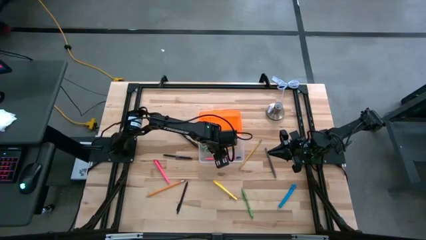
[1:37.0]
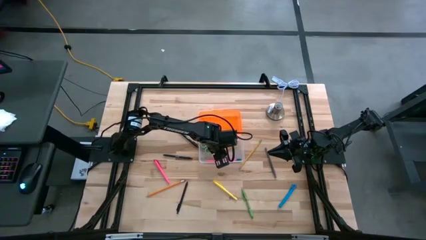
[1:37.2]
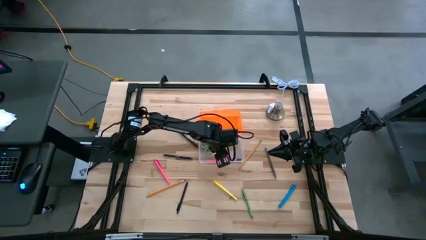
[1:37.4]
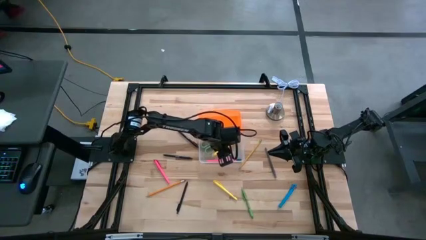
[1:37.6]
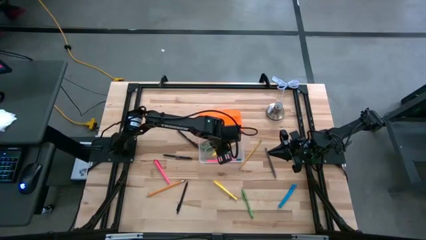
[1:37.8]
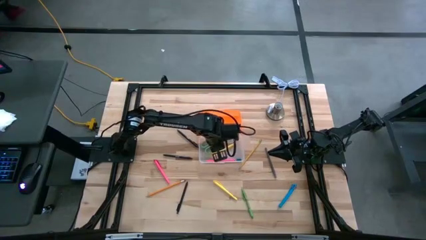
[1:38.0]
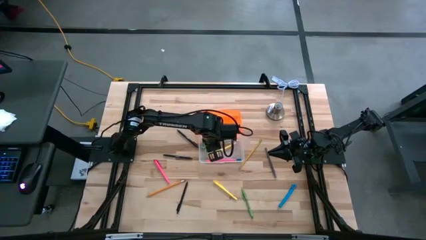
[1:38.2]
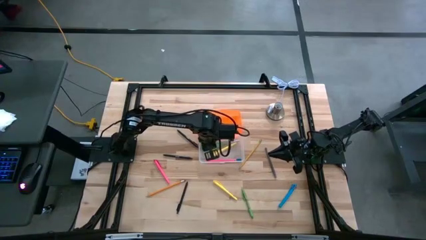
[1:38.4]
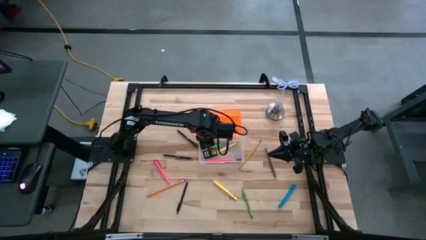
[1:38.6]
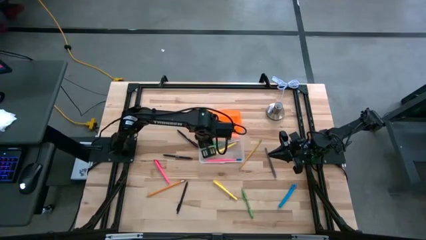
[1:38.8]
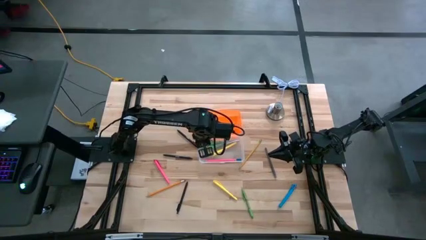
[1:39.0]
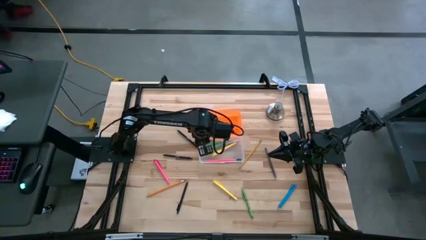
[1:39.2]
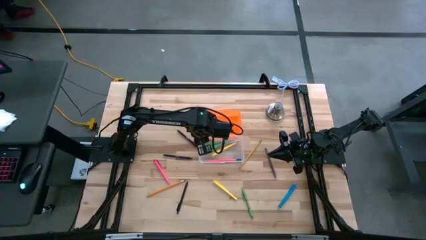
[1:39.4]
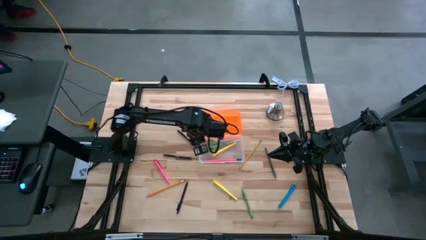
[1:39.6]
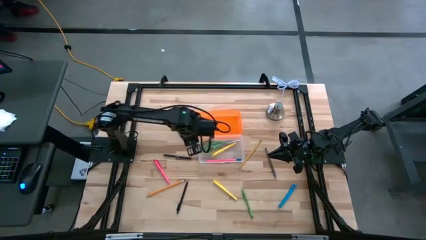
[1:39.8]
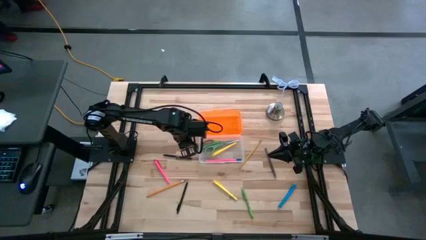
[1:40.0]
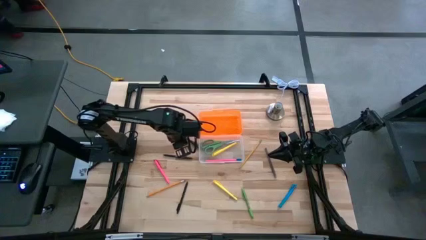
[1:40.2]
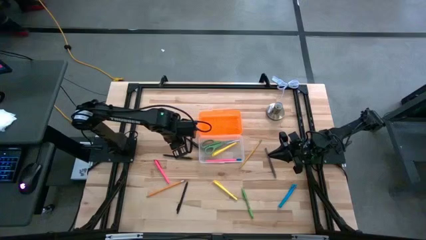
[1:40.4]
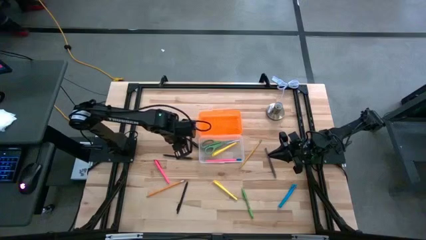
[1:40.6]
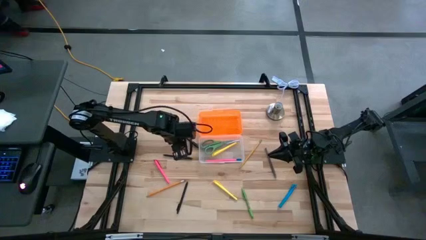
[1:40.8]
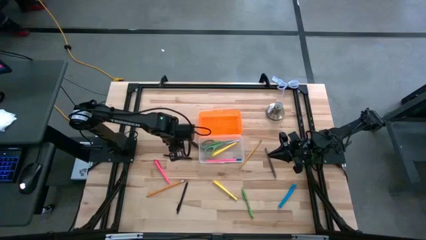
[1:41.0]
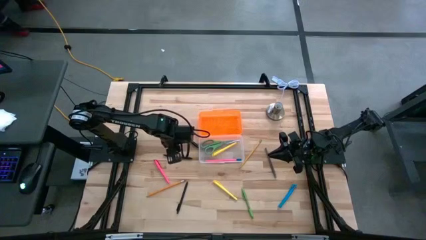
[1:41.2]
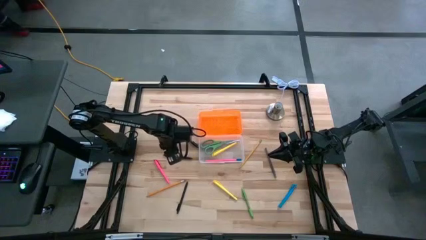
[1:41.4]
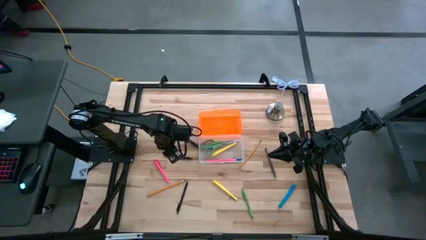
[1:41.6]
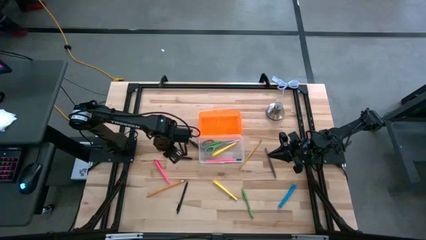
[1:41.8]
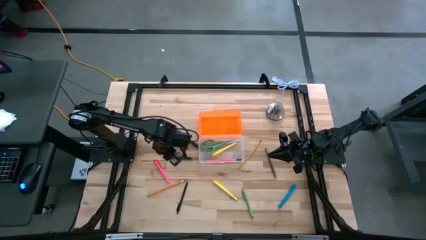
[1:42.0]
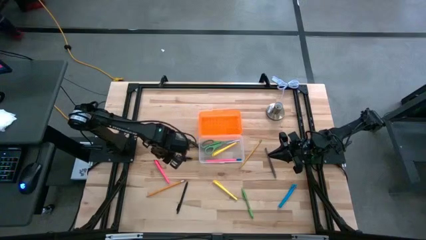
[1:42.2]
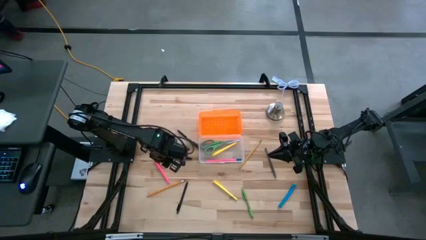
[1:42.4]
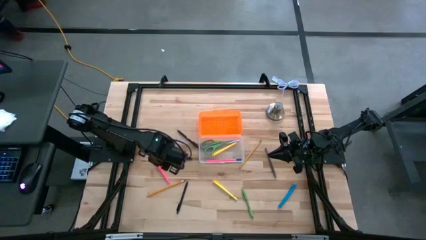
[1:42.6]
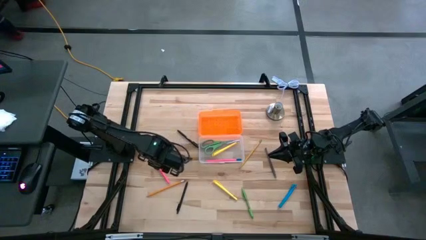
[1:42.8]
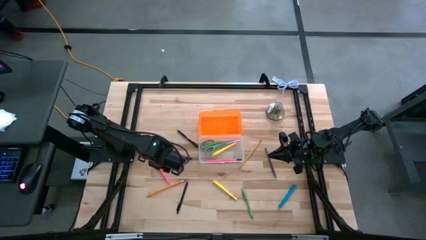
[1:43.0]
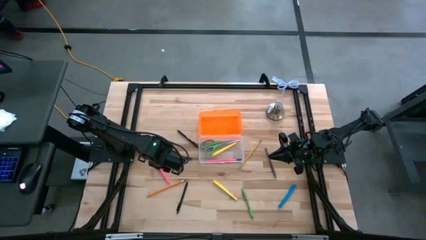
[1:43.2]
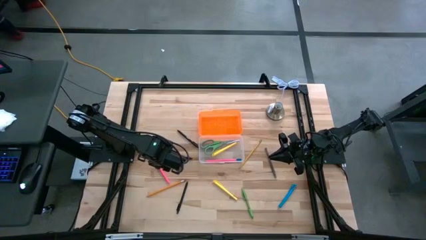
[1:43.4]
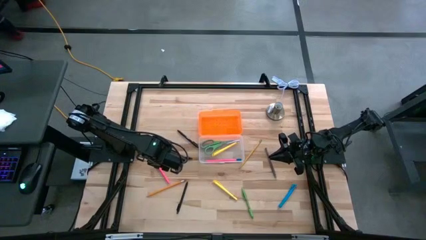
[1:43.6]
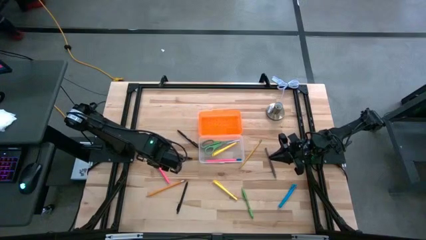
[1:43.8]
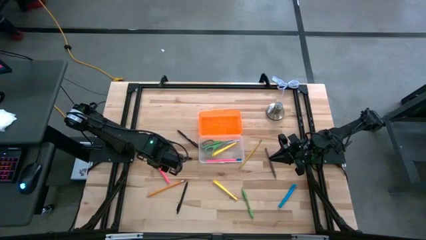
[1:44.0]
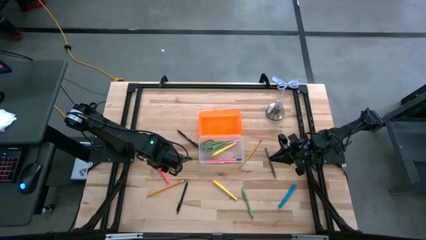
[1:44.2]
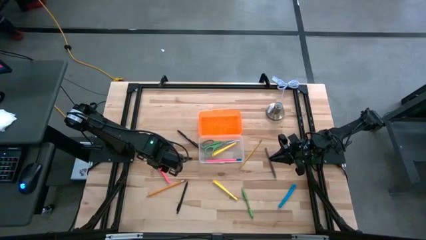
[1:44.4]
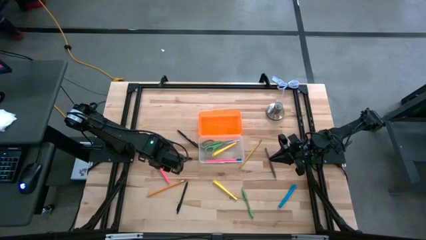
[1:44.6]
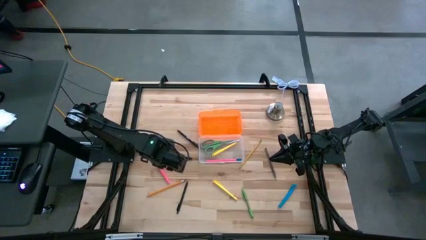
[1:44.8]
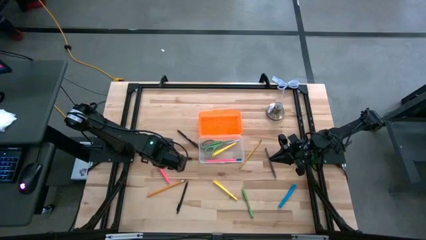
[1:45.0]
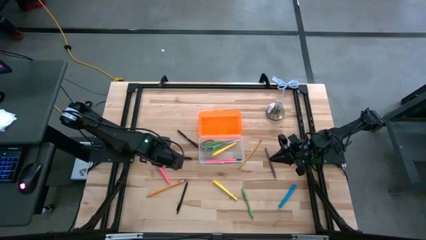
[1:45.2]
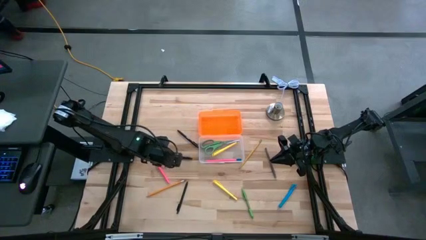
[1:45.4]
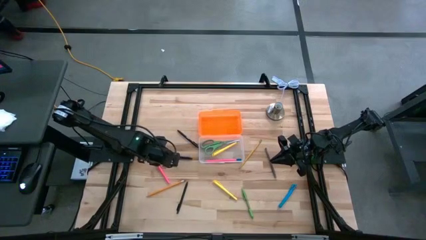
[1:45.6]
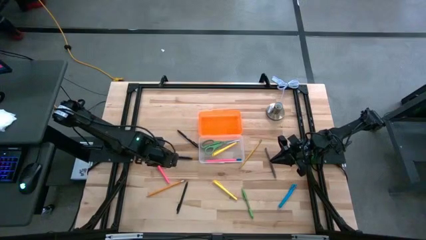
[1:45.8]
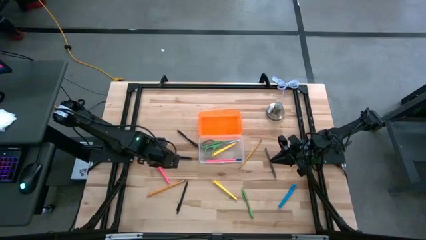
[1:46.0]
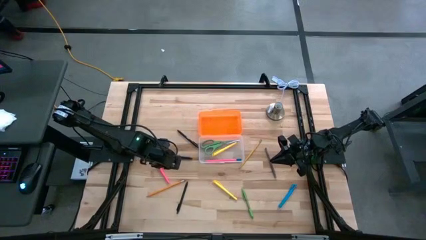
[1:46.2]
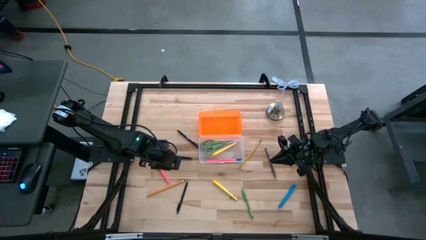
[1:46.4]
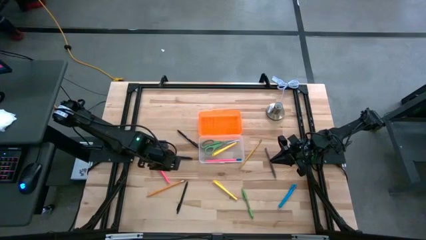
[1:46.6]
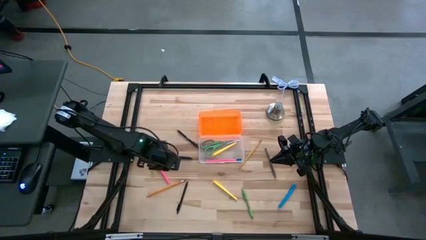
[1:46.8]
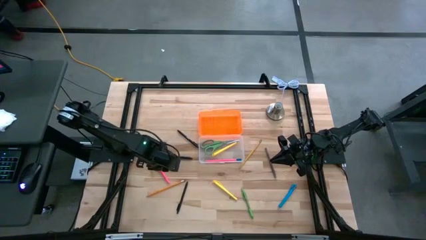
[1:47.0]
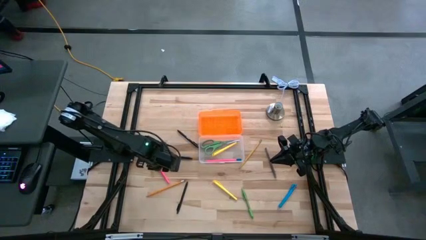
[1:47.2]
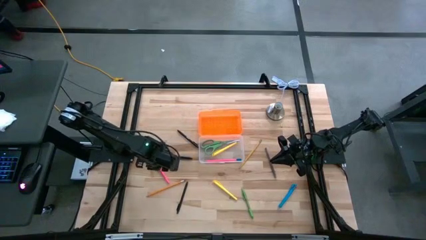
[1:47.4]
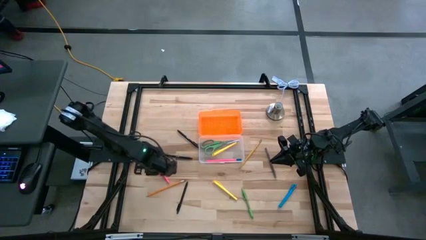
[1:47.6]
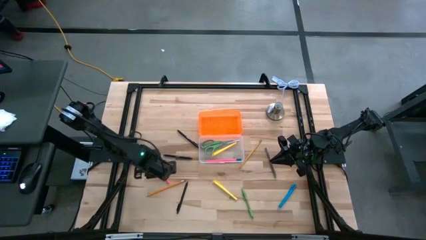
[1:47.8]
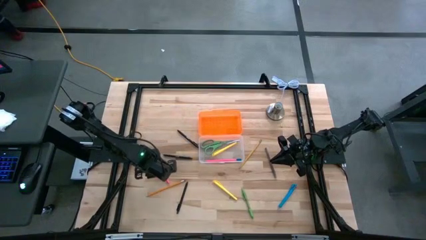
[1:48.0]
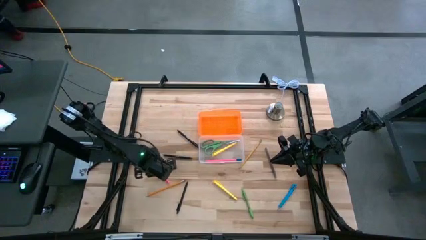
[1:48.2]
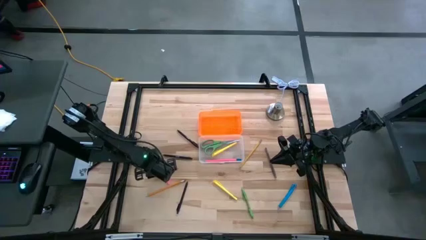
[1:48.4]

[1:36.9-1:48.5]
Task: Pick & place school supplies into a supply box
Put the pink pen into the container

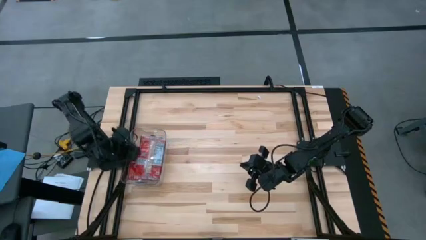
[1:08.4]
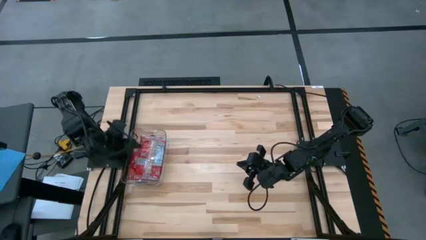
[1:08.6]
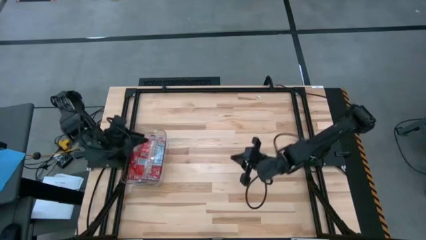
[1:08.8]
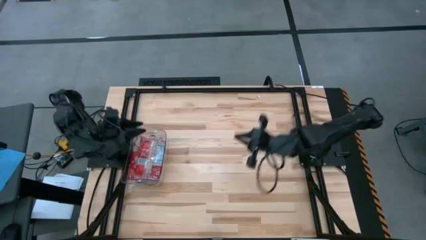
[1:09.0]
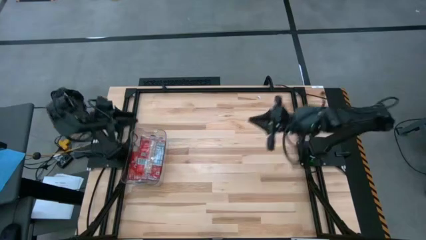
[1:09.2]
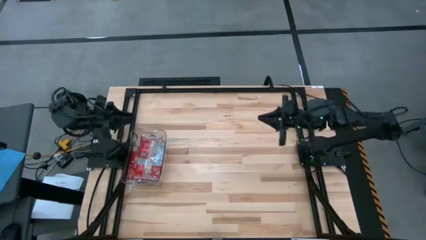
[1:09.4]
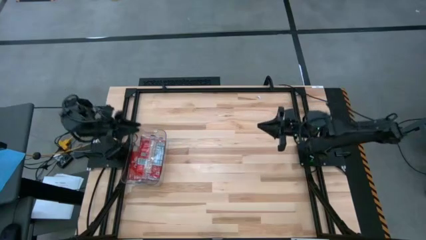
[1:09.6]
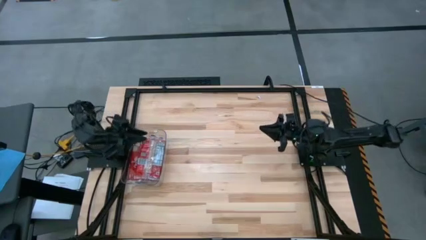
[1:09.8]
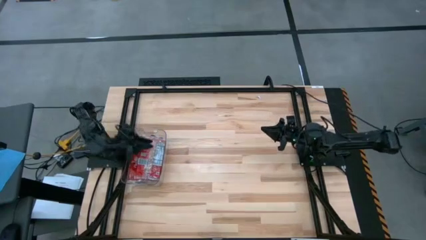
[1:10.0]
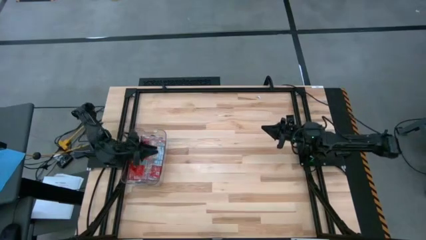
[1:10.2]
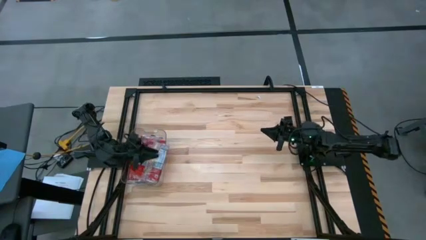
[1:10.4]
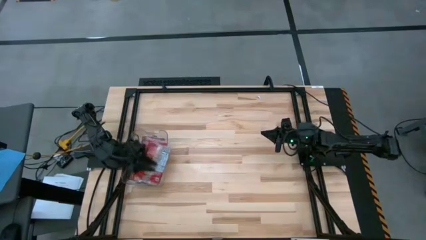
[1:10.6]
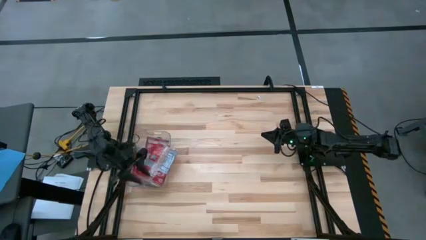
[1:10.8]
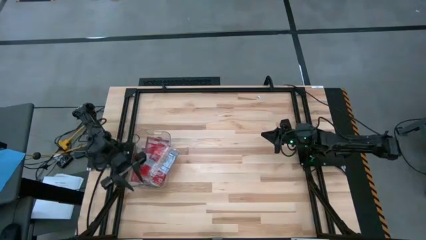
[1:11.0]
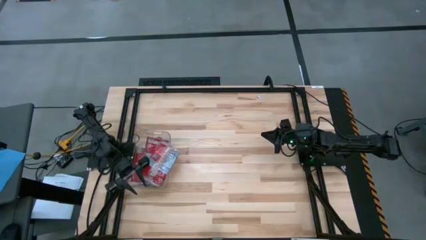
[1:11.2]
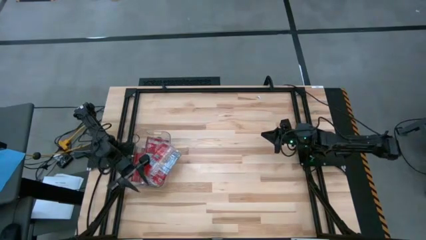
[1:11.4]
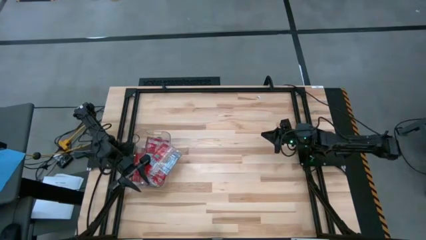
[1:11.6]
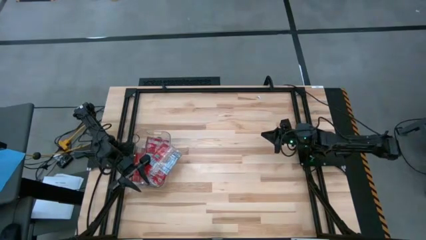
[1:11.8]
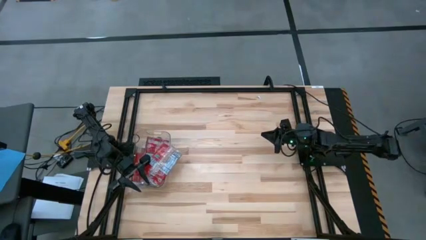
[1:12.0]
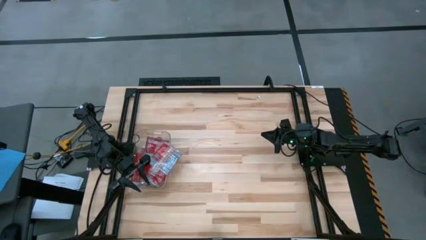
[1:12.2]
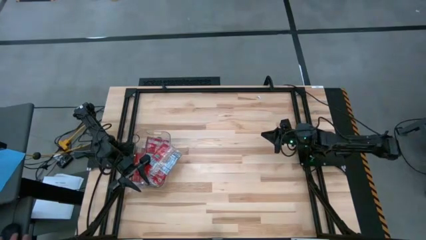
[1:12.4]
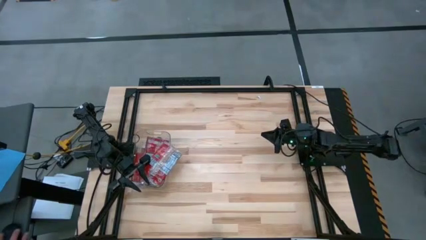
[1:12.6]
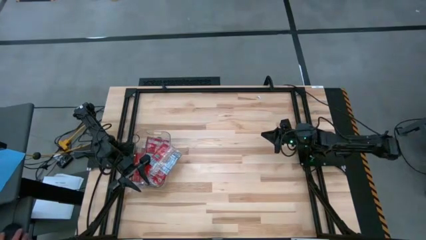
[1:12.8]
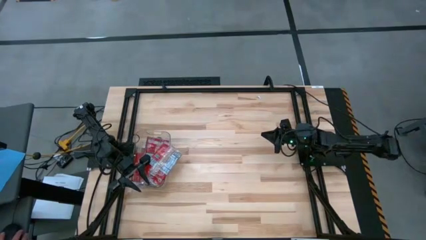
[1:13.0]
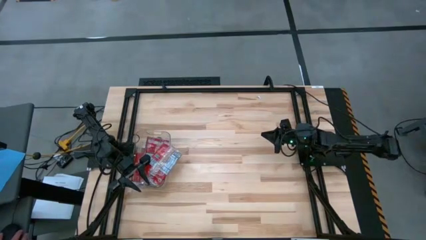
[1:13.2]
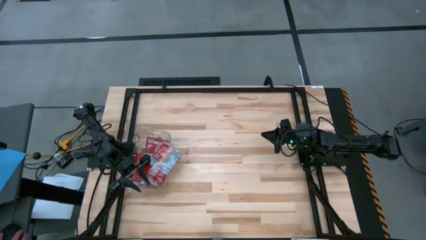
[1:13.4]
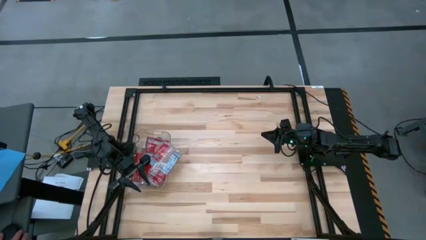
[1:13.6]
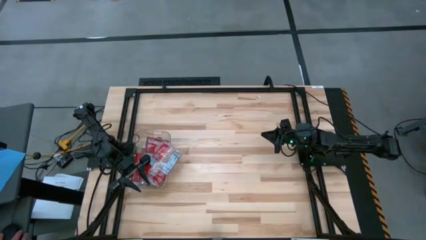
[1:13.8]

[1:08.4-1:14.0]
Task: Sort popcorn bags into baskets
Return to Home Position
